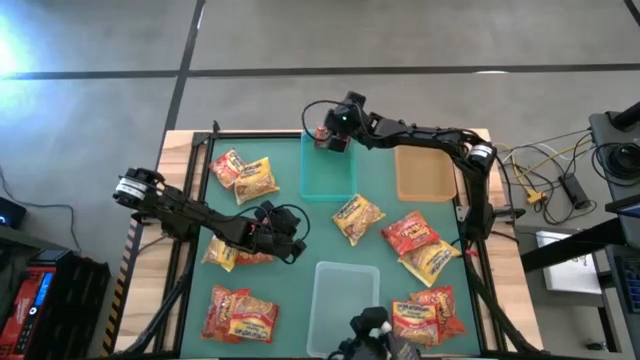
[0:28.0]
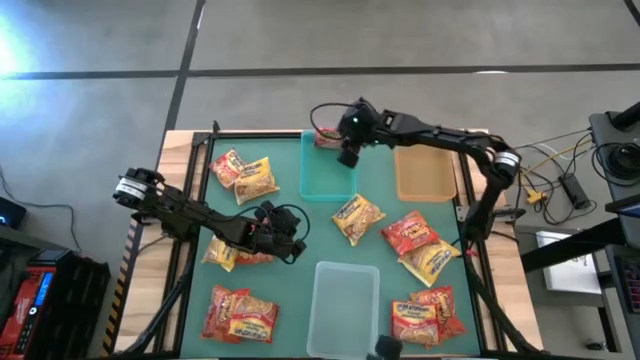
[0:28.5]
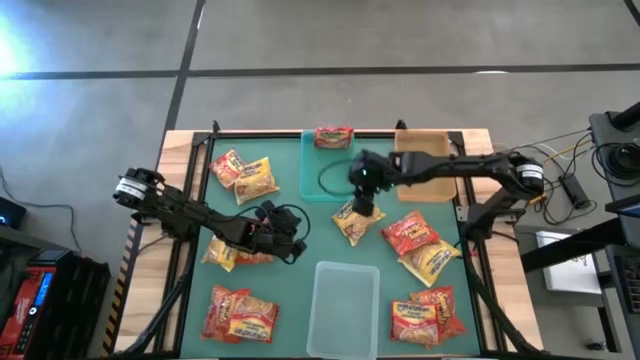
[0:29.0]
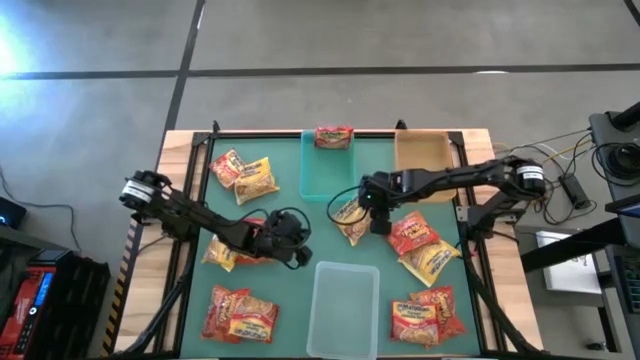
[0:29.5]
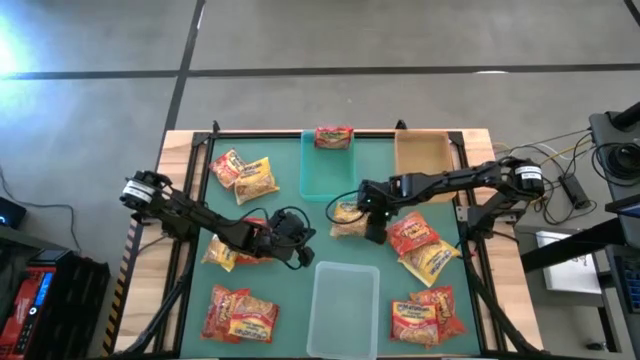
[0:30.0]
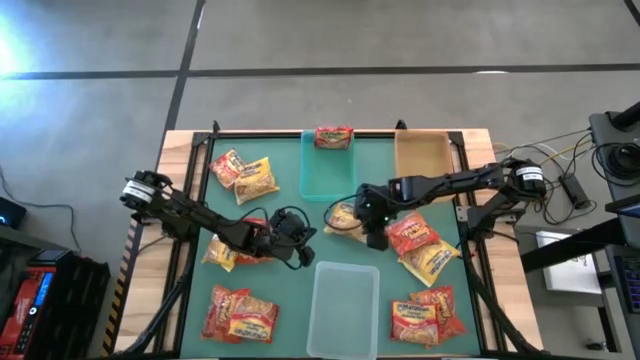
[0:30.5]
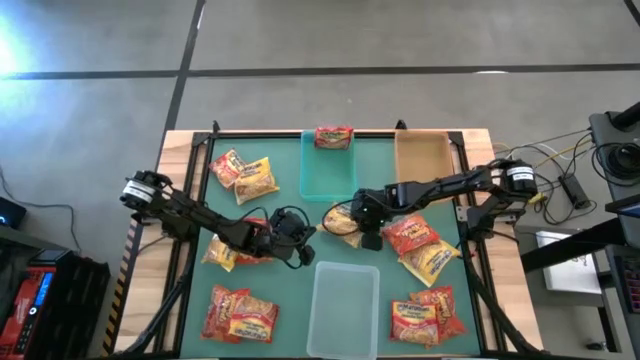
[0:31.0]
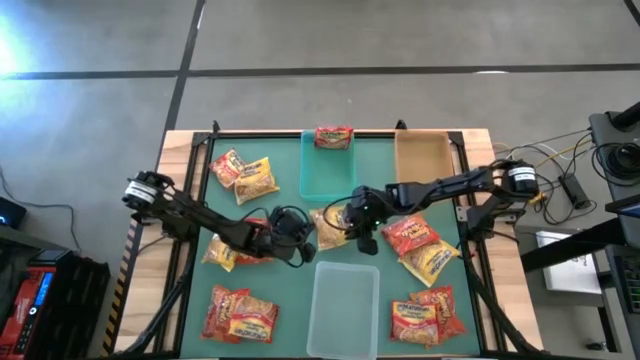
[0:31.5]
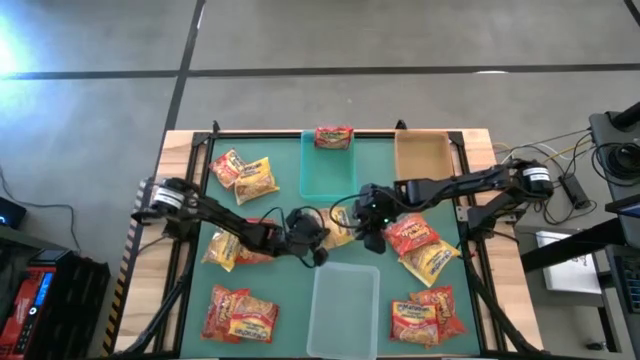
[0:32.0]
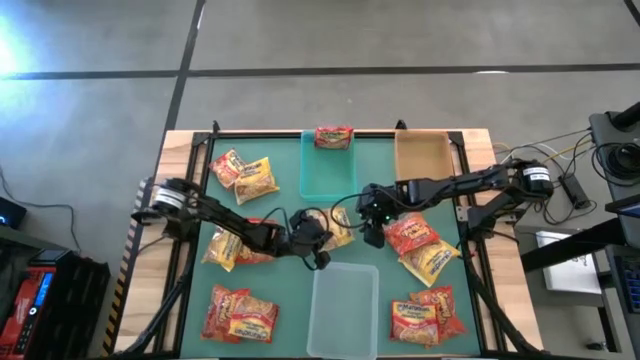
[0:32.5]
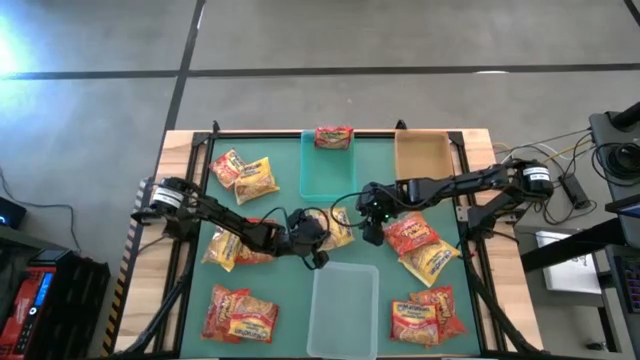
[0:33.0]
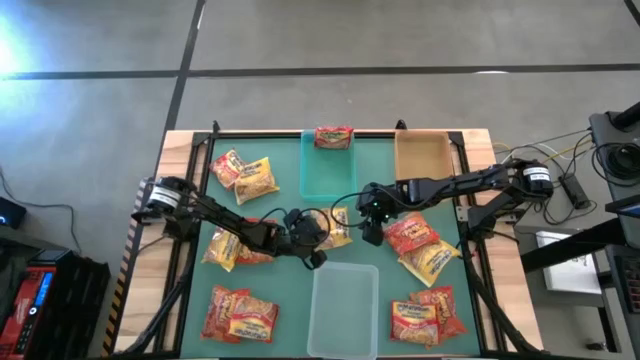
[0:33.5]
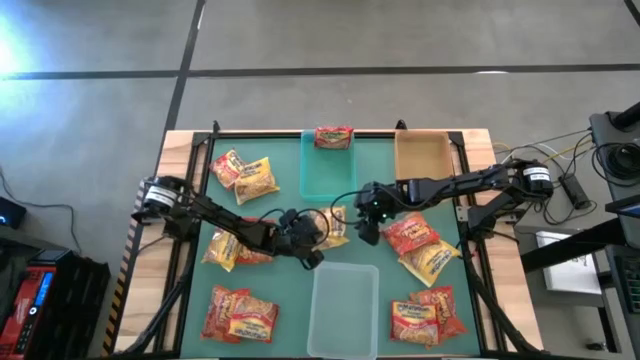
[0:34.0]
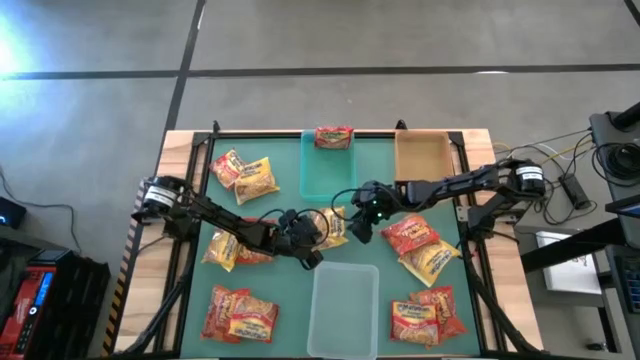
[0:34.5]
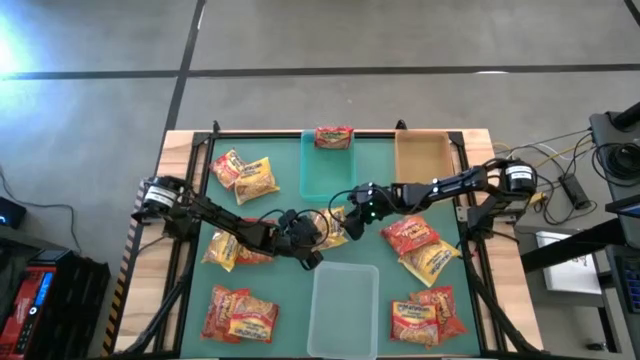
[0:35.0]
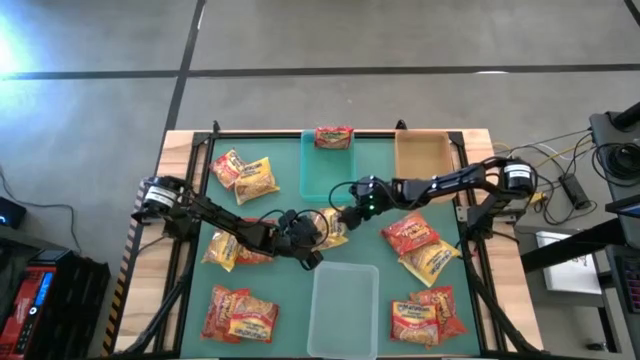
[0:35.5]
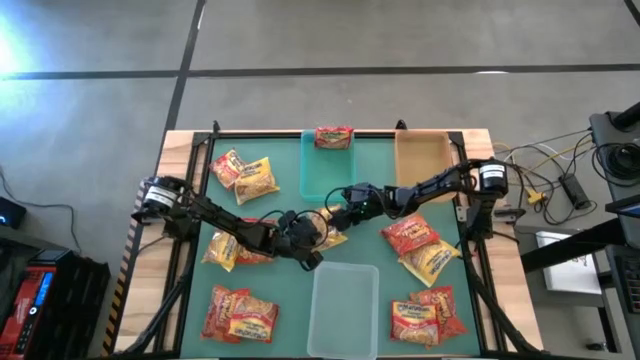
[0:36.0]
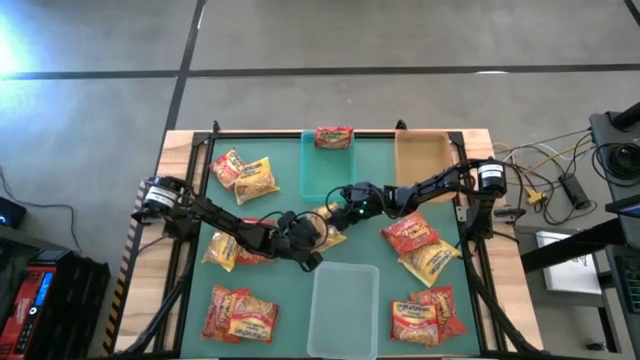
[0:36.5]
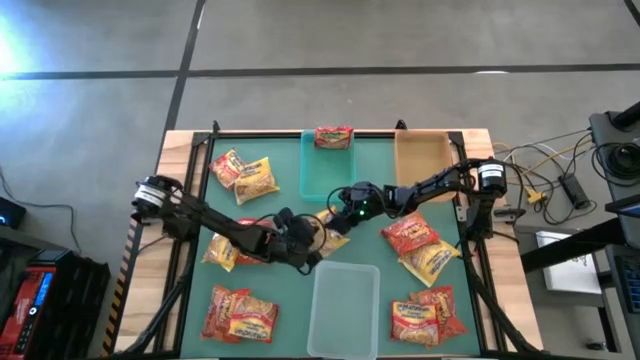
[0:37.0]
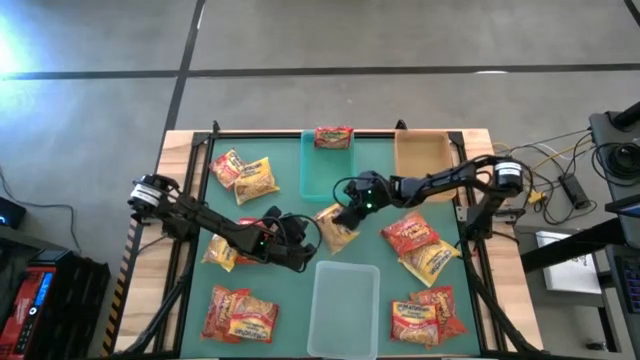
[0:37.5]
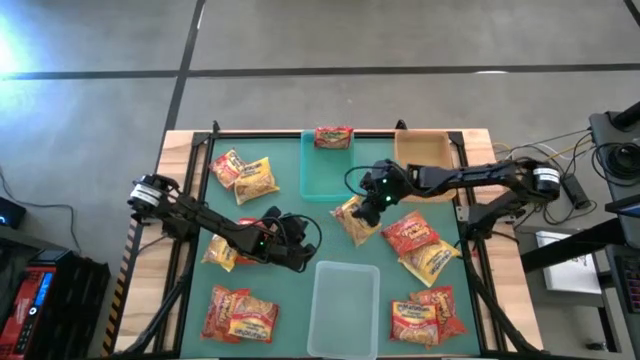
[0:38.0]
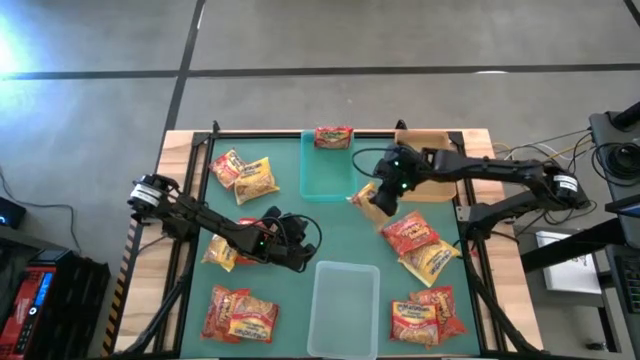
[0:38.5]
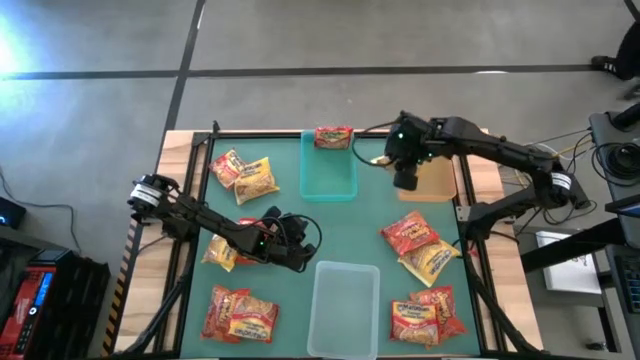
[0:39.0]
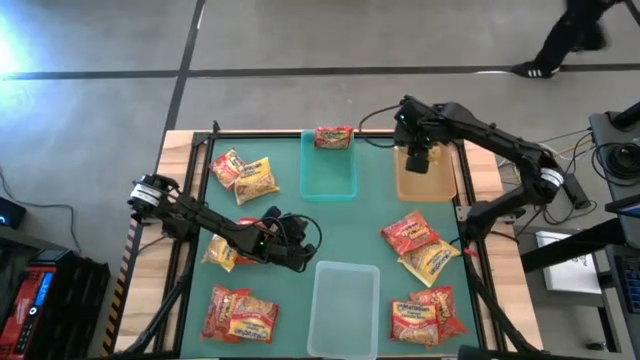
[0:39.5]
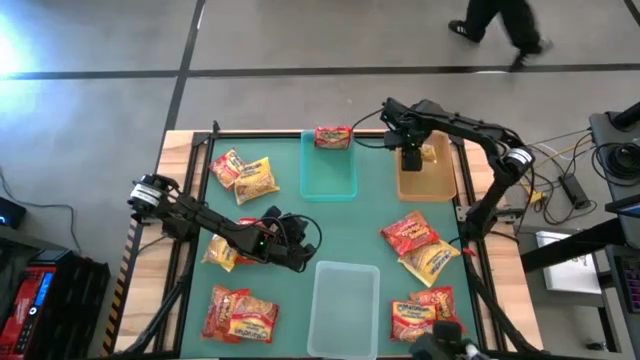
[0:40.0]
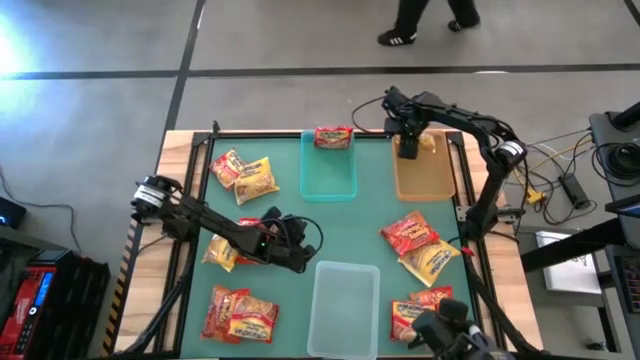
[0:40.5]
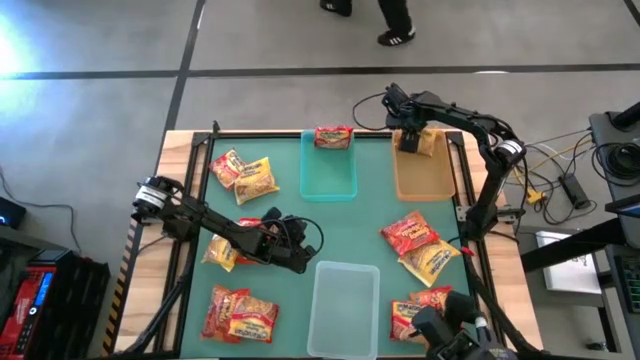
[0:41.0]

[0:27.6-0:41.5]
Task: Sort Maruchan noodles
Put the center yellow noodle pack into the transparent orange bin

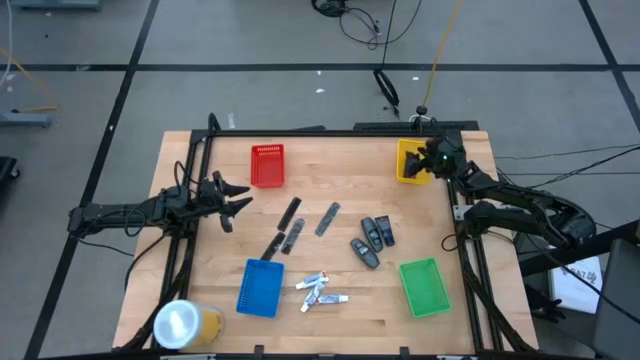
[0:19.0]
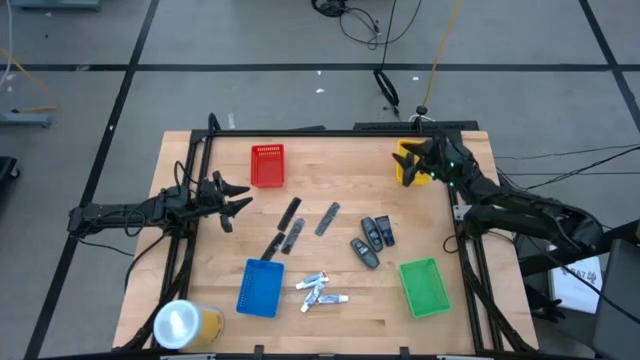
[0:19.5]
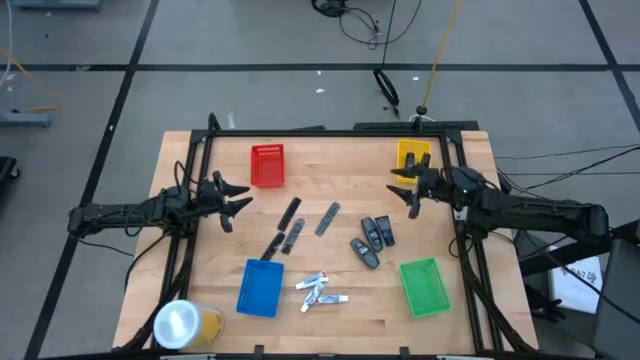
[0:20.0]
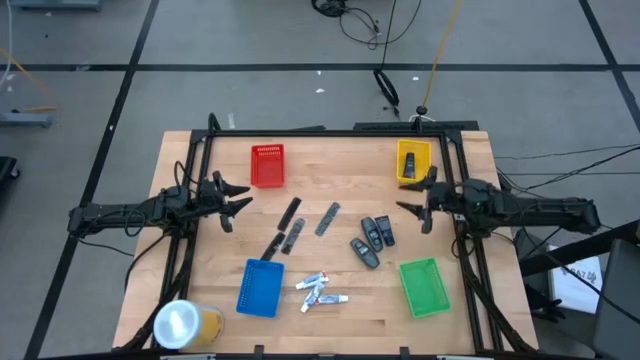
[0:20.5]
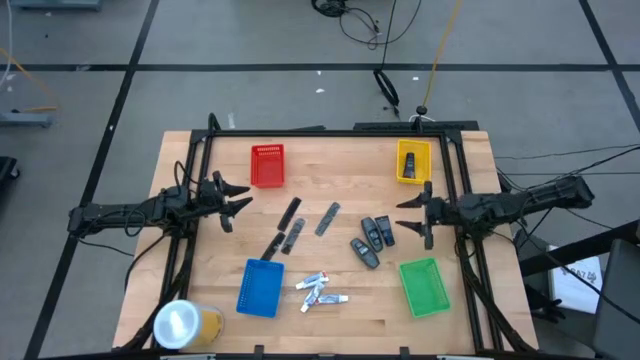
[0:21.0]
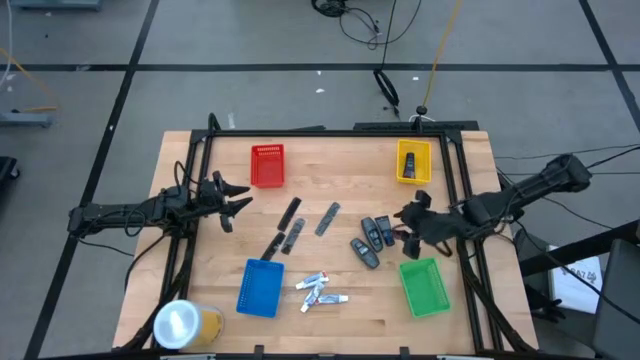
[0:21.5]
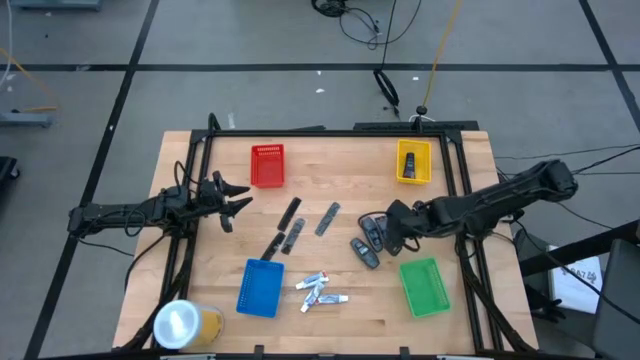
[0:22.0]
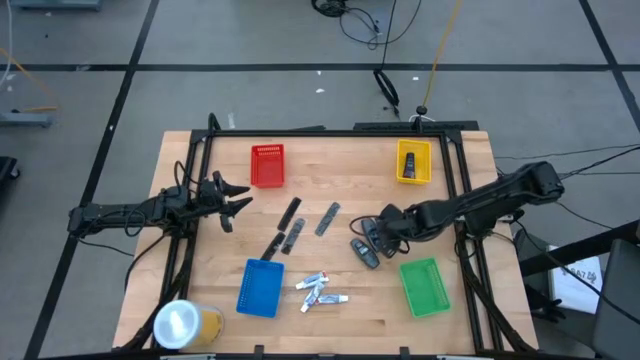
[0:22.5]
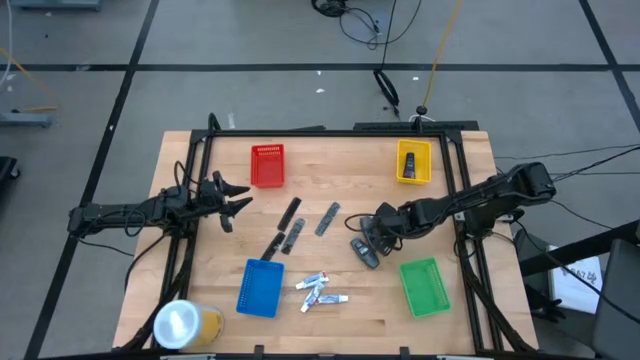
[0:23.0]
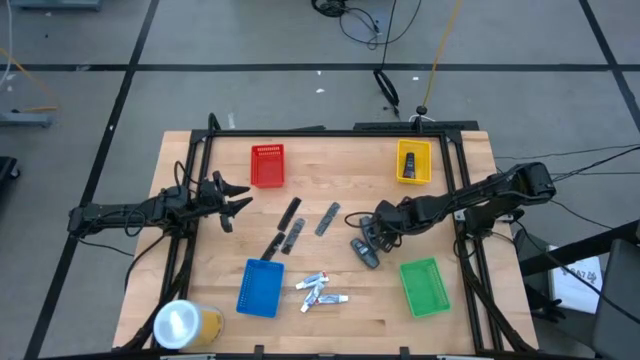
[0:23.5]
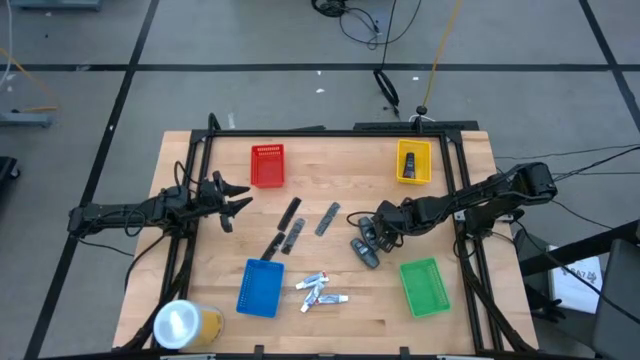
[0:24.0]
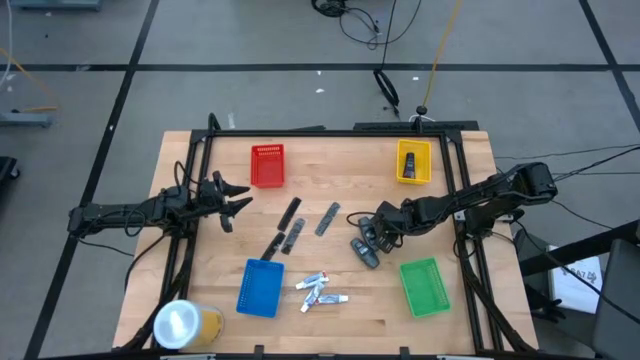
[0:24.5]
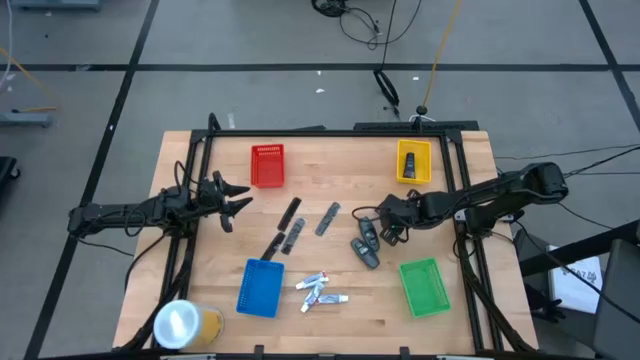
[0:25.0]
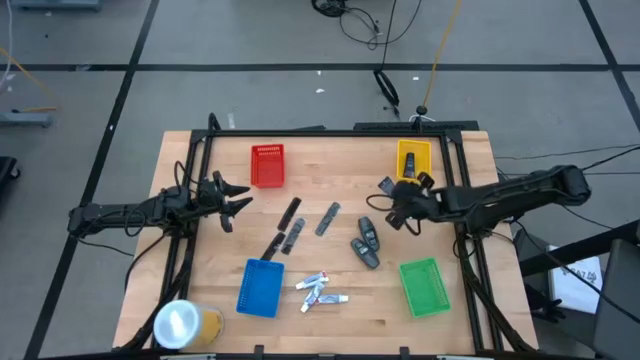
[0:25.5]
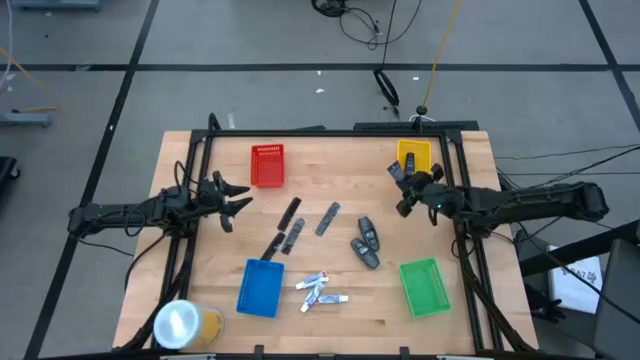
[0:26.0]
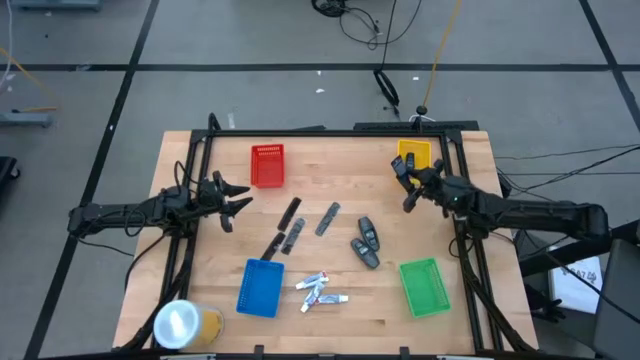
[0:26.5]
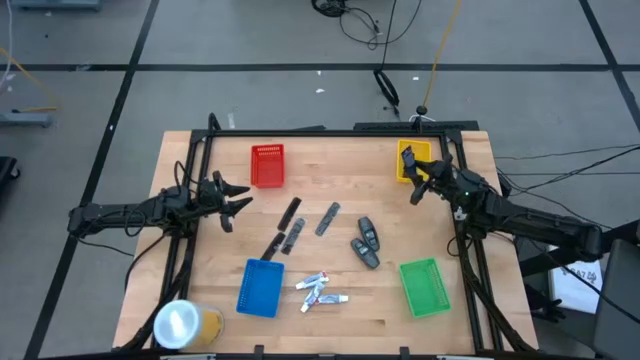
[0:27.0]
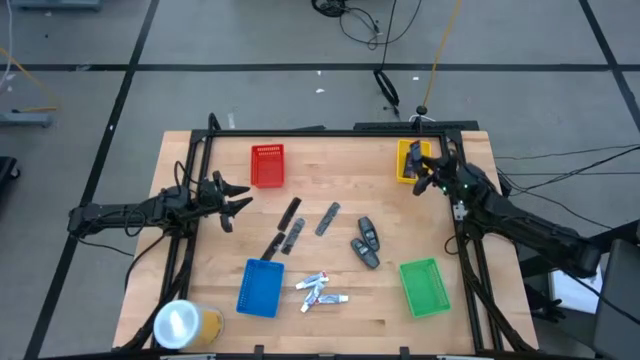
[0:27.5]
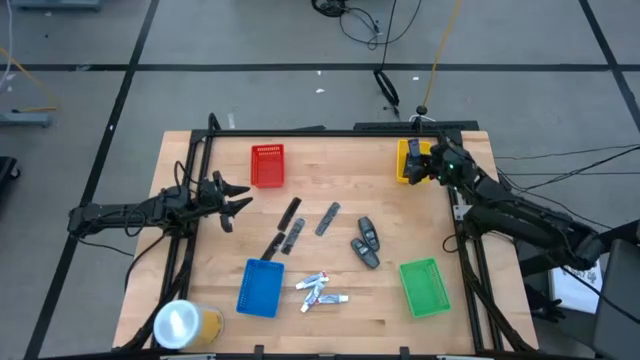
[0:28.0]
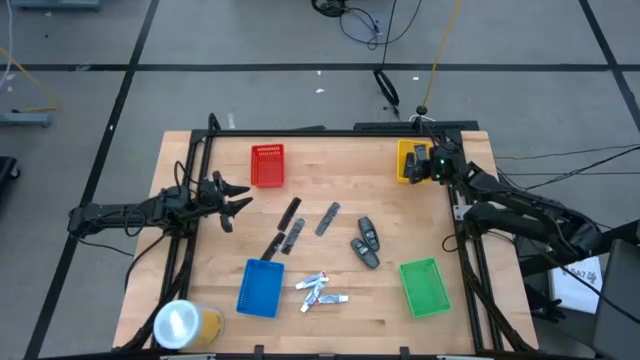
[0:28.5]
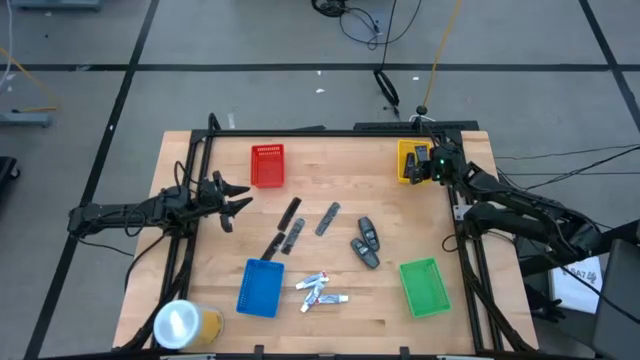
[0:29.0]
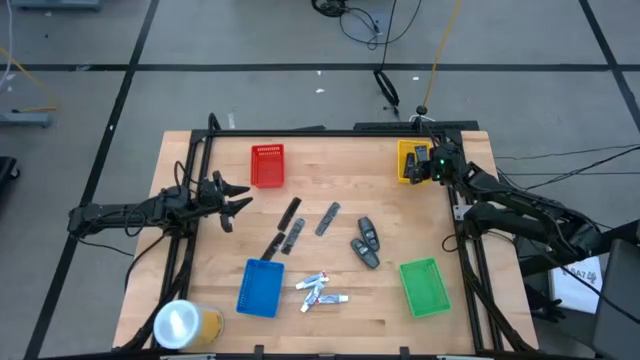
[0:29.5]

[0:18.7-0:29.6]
Task: Pick & Place Travel size toiletries
Put the blue shave cream into the yellow basket
